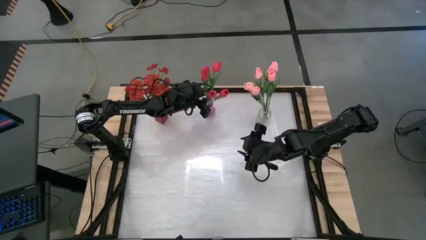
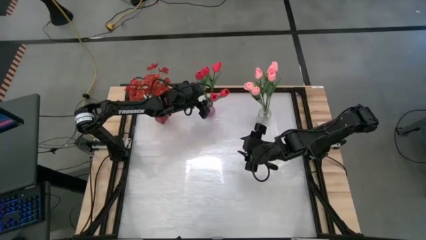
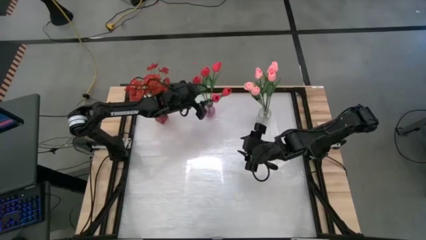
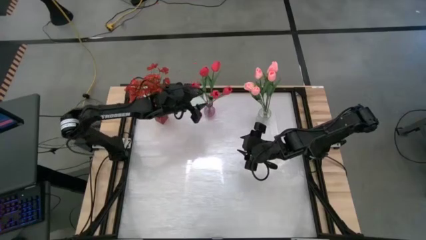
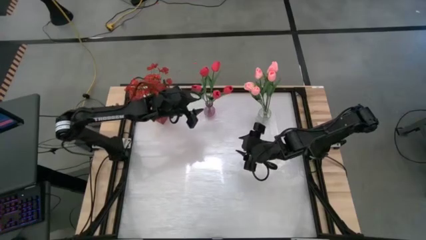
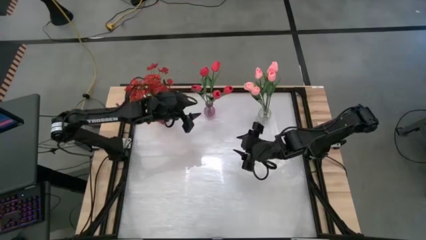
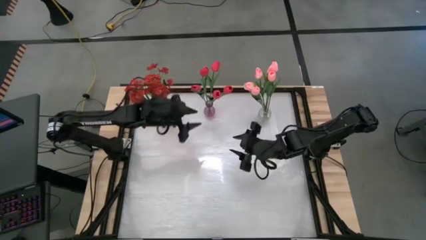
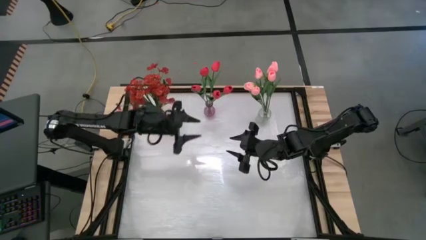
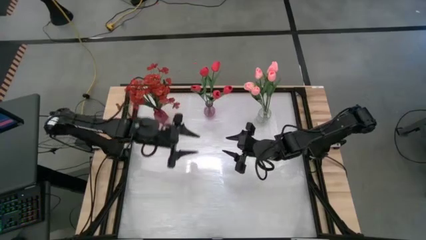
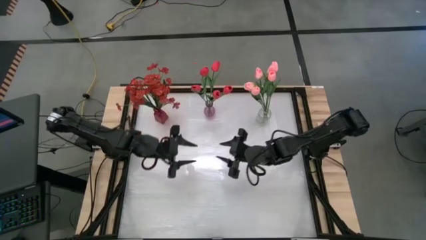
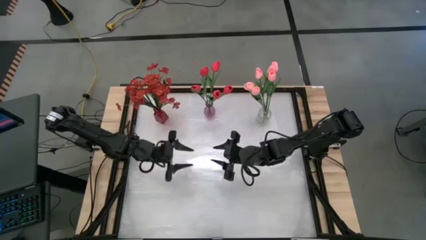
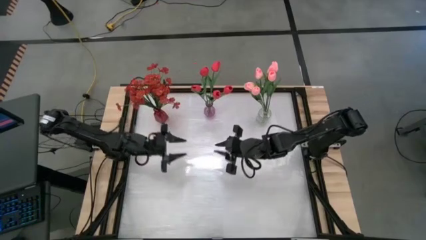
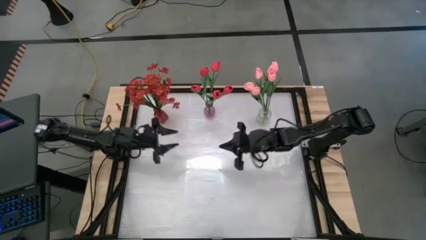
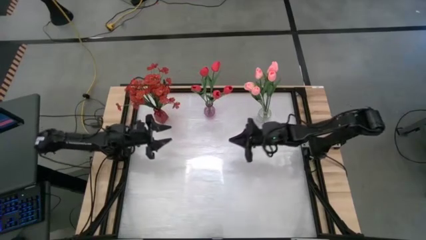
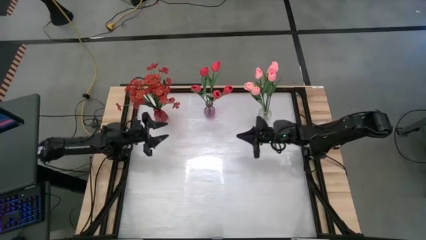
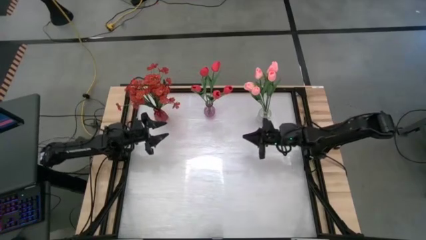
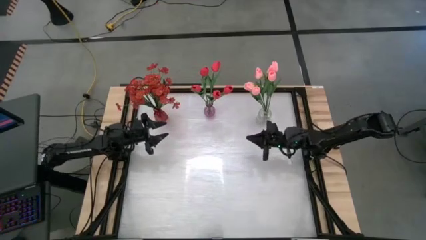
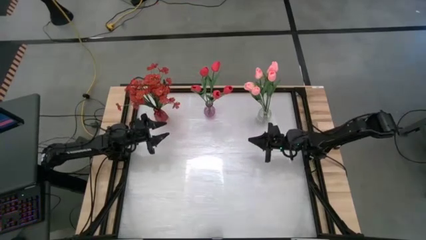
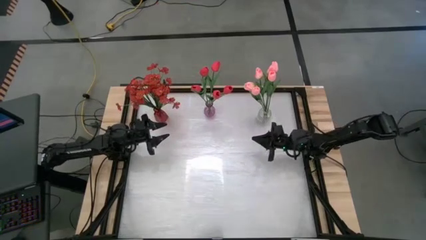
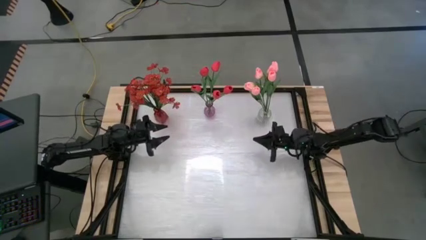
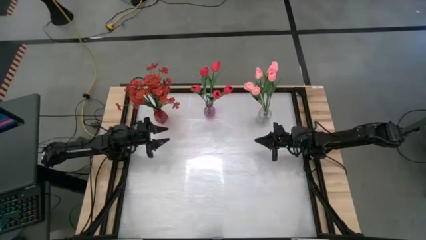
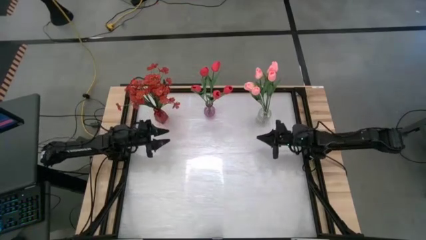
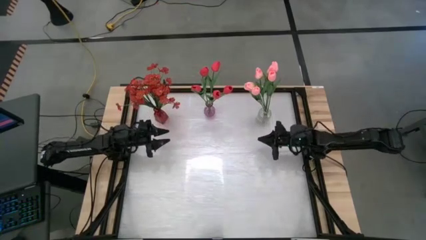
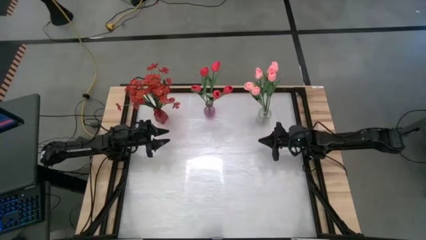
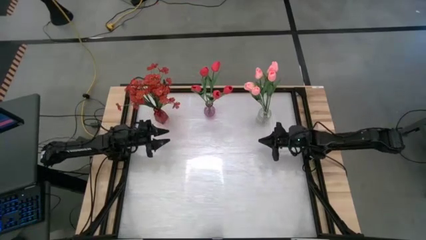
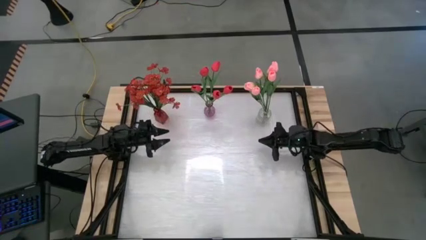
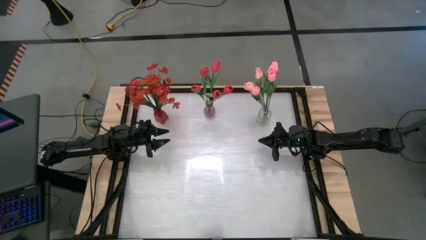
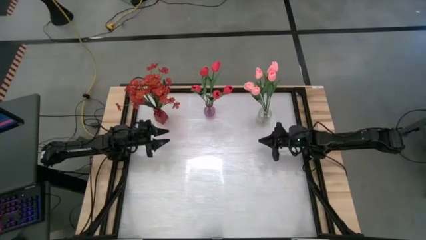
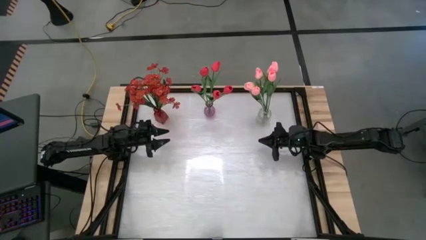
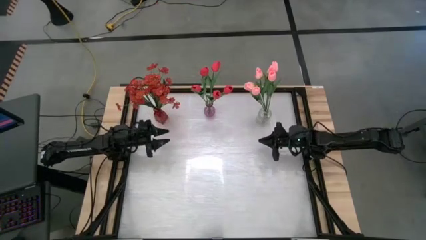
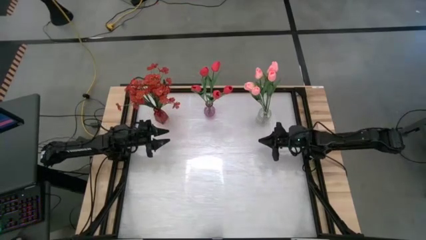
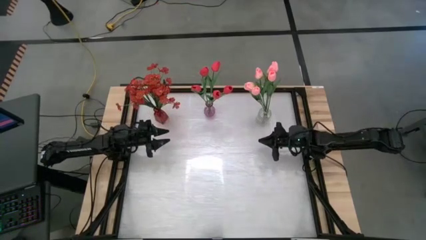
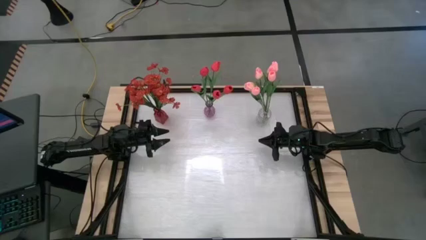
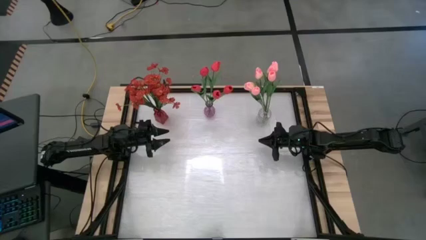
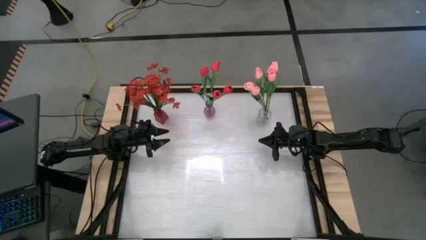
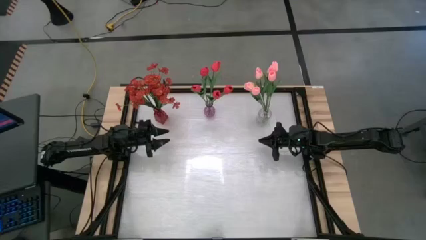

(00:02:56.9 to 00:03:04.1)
Task: Sort flowers into vase by color
Return to Home Position

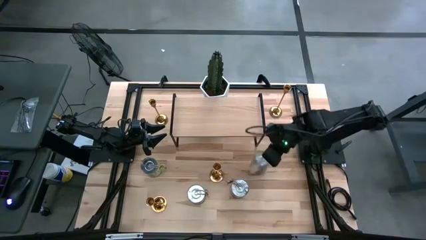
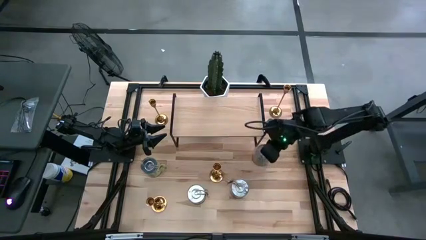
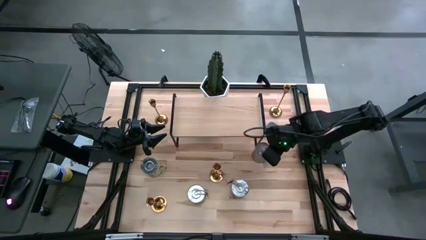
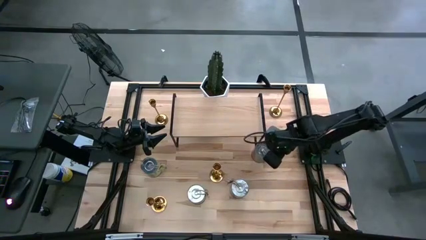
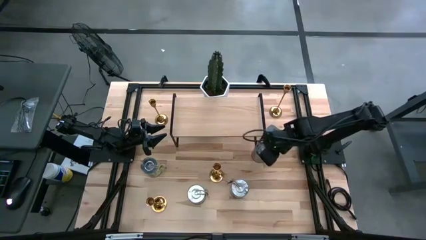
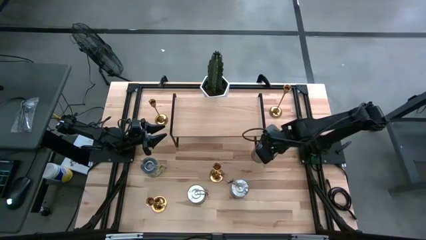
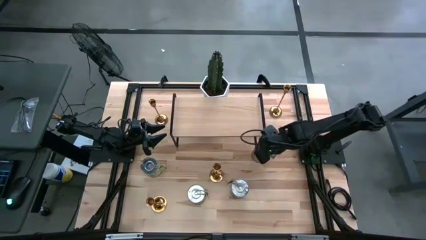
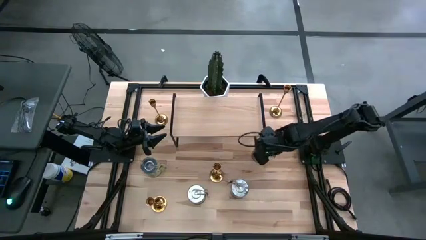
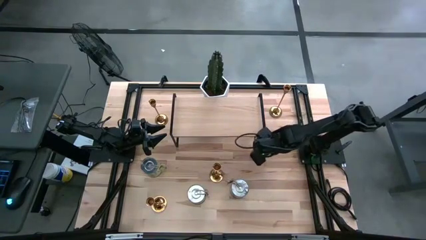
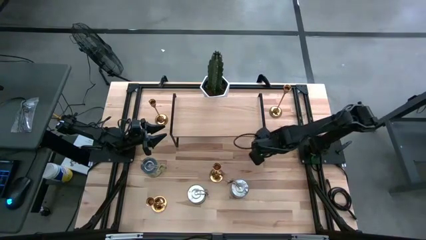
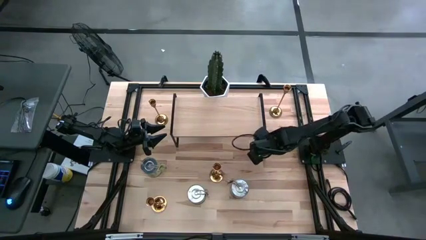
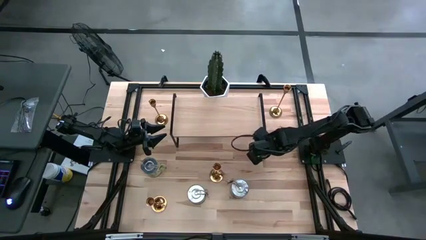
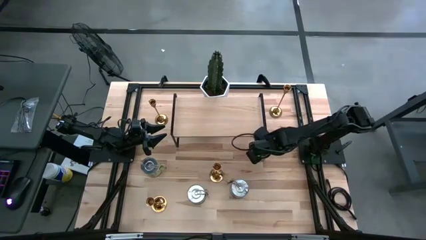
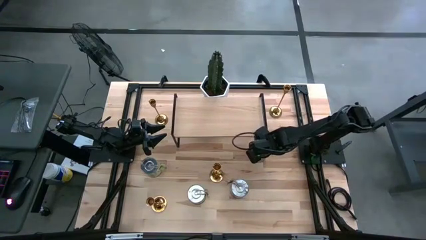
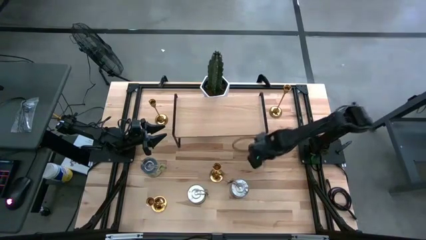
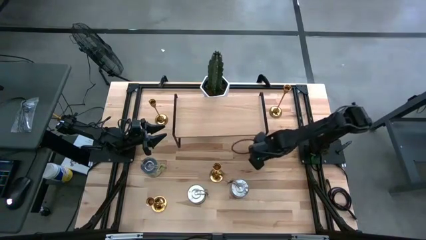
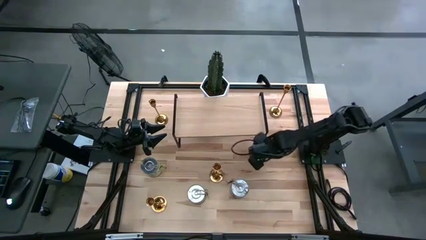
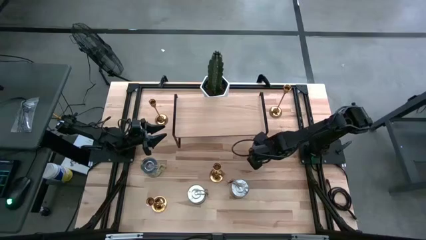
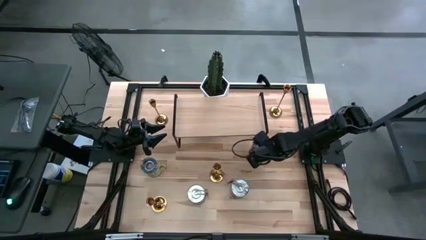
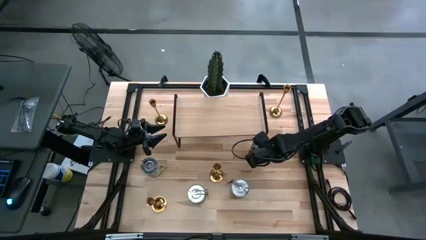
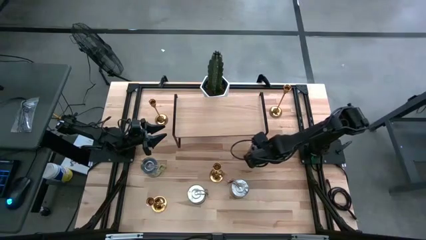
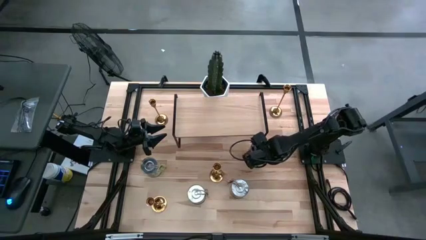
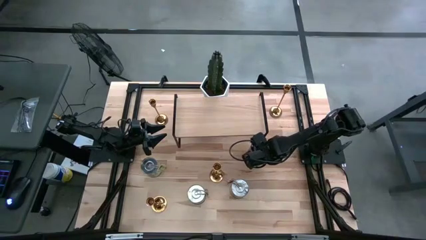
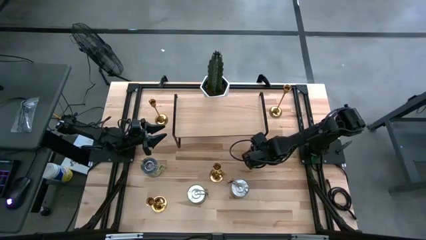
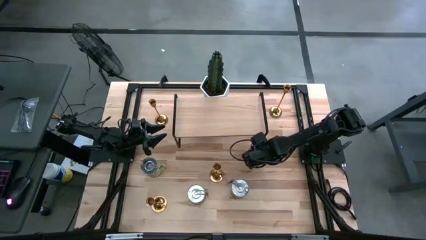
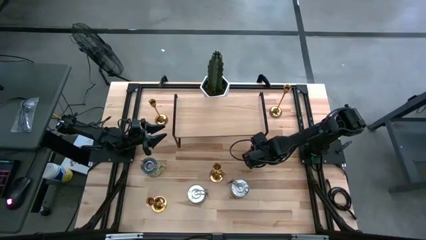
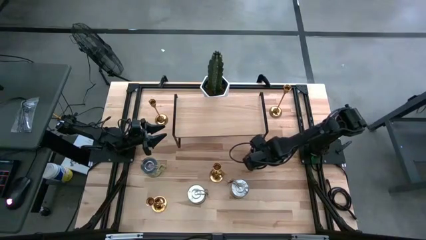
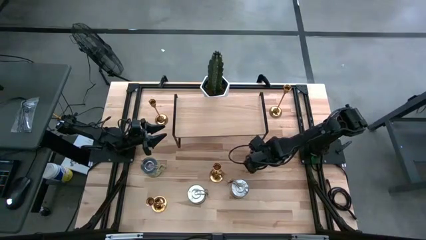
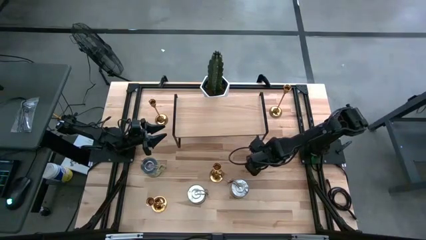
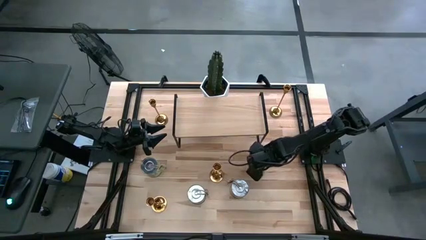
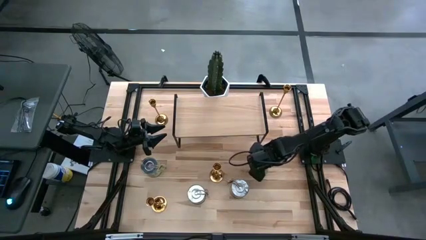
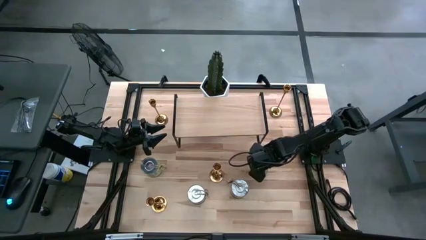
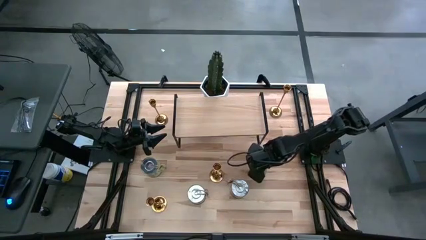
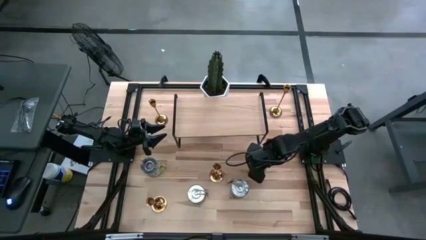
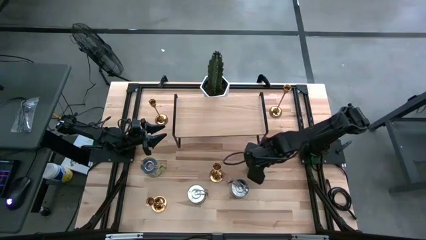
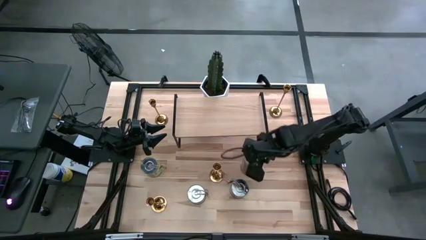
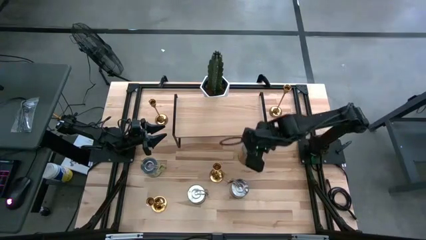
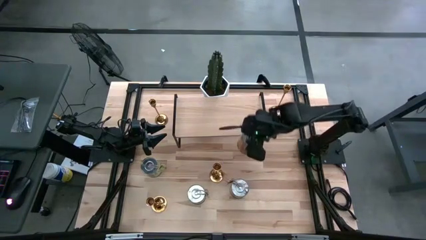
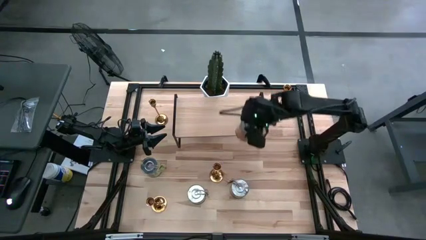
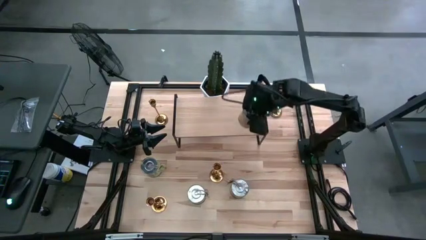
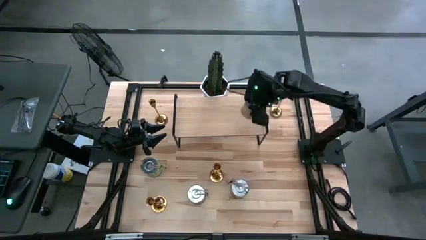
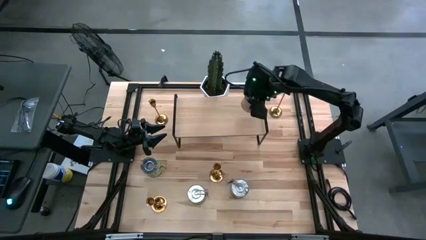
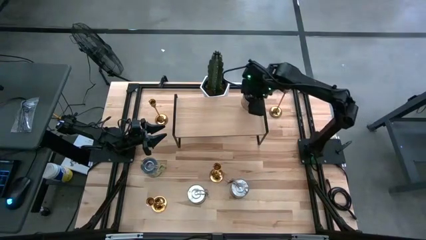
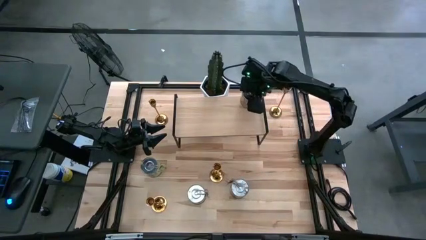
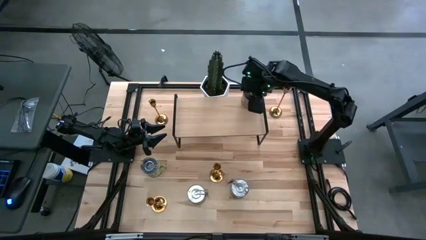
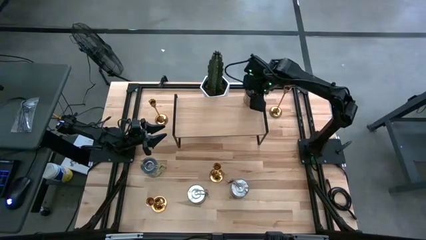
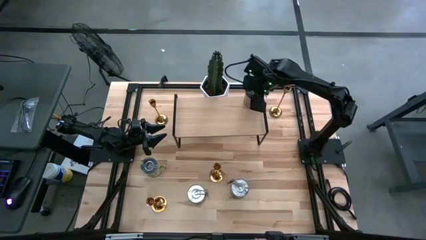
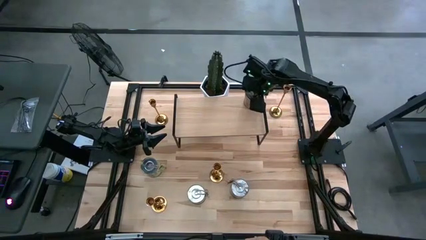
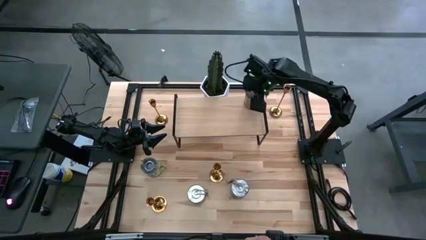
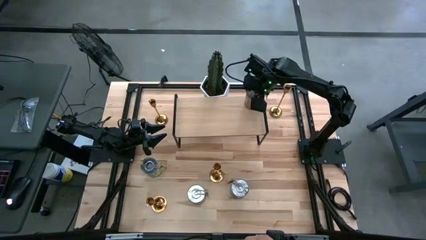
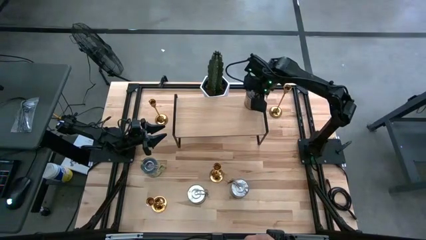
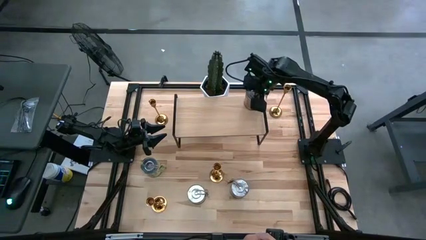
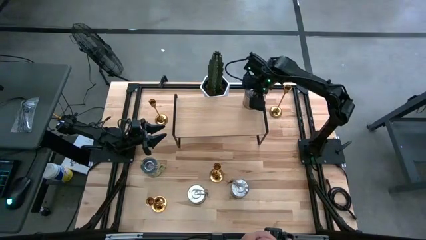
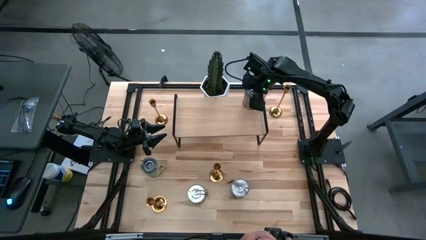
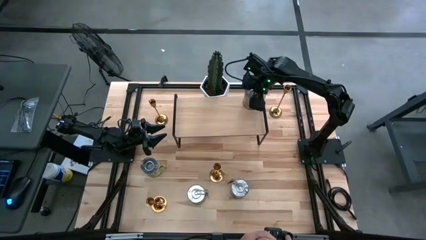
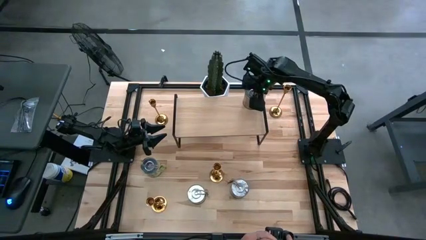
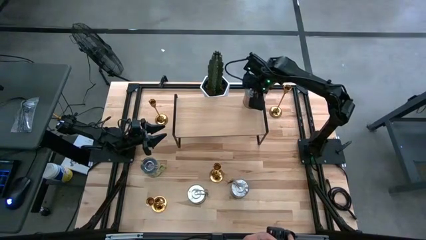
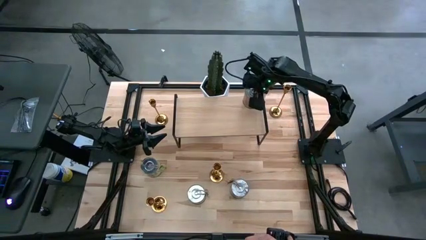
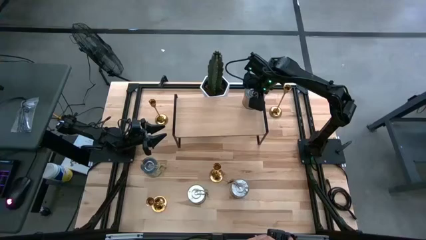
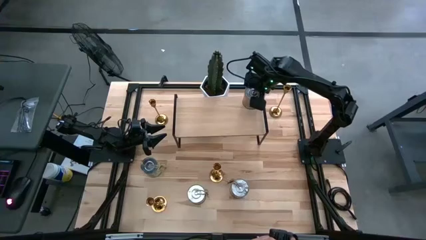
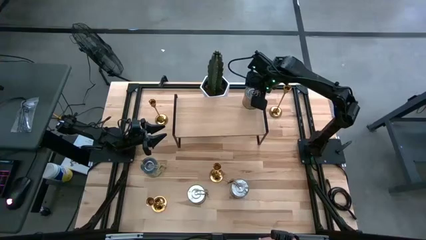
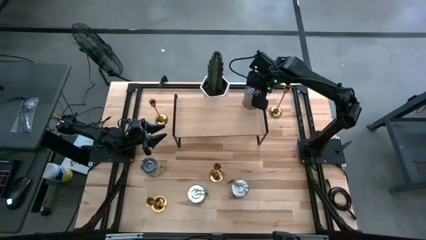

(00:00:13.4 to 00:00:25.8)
Task: Pick & Place candle stick holders
Put the silver scented candle can on the shelf
